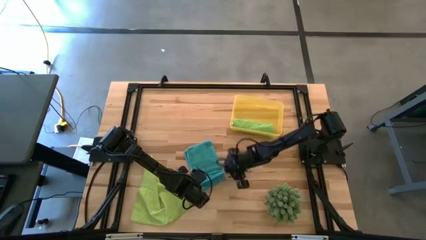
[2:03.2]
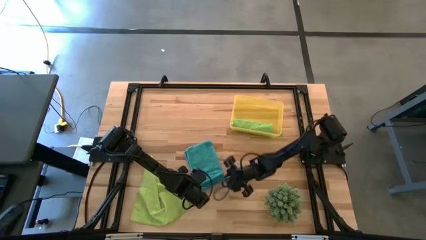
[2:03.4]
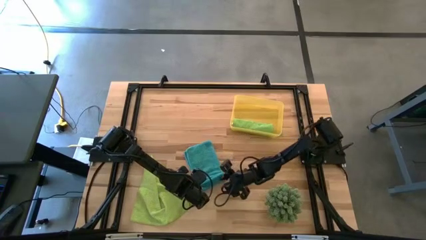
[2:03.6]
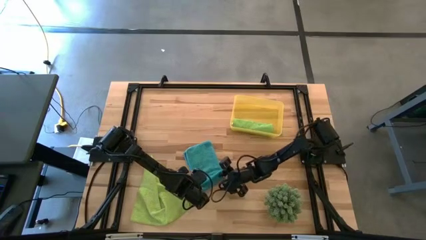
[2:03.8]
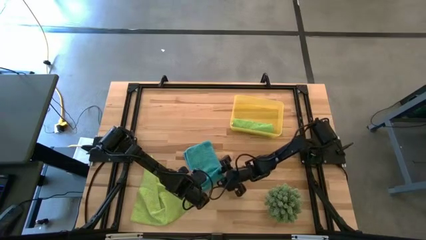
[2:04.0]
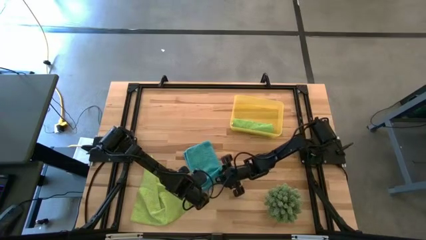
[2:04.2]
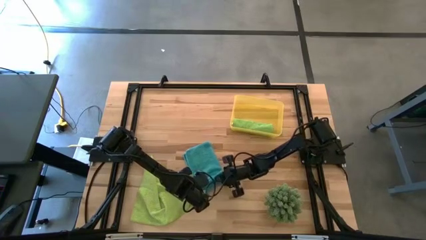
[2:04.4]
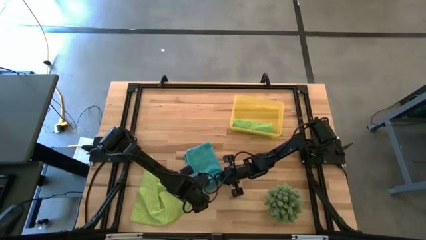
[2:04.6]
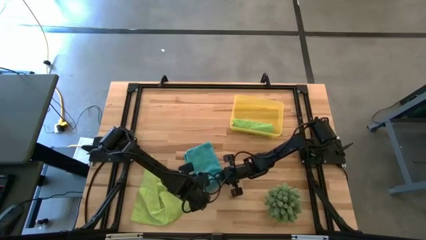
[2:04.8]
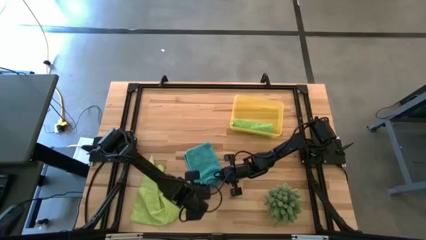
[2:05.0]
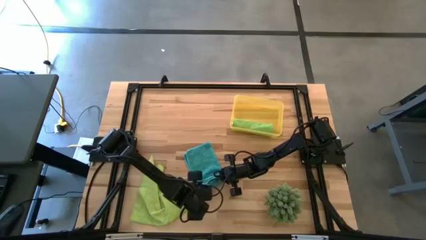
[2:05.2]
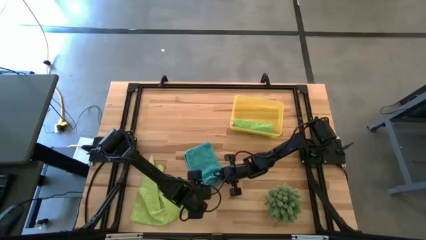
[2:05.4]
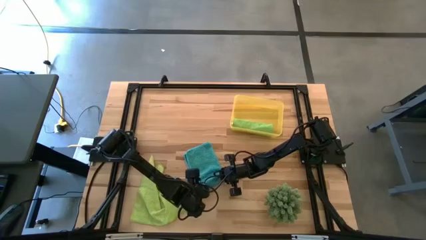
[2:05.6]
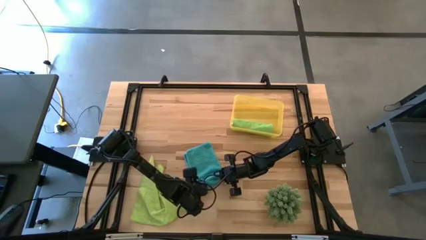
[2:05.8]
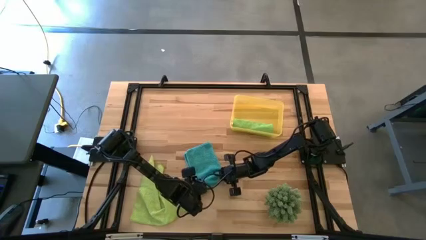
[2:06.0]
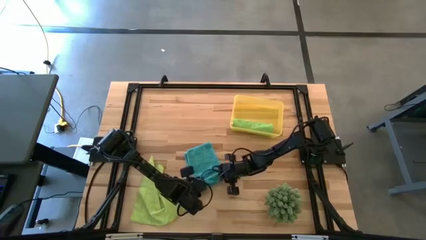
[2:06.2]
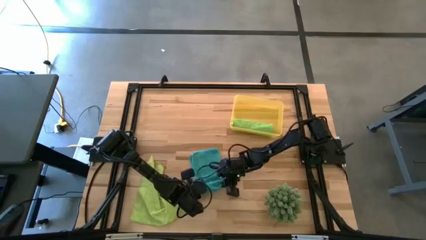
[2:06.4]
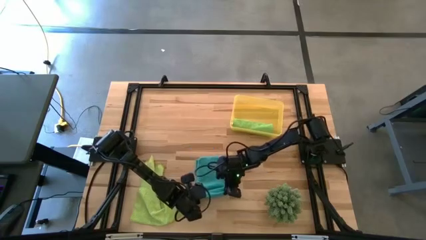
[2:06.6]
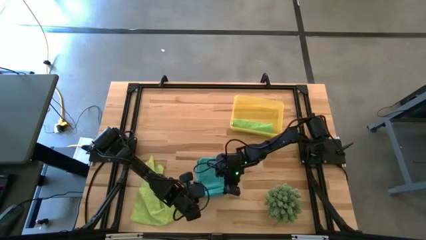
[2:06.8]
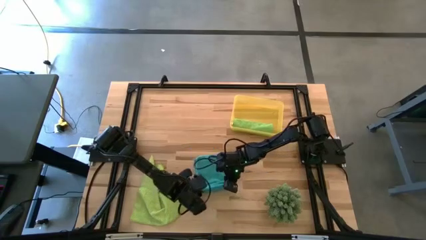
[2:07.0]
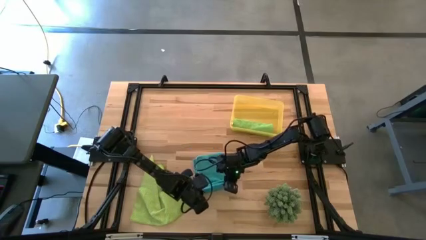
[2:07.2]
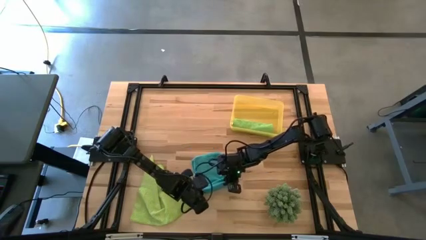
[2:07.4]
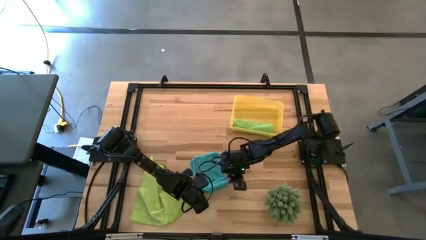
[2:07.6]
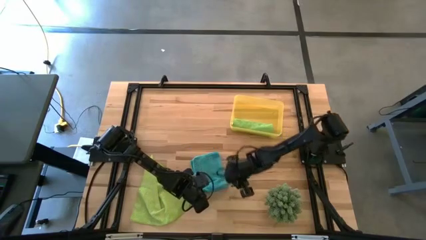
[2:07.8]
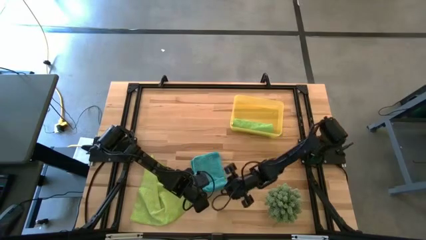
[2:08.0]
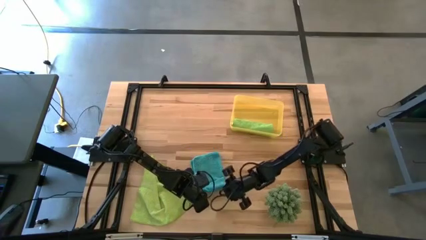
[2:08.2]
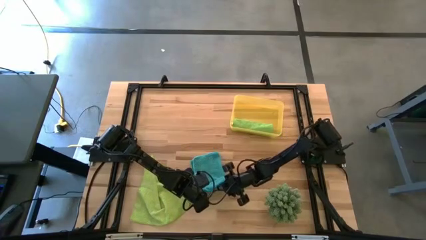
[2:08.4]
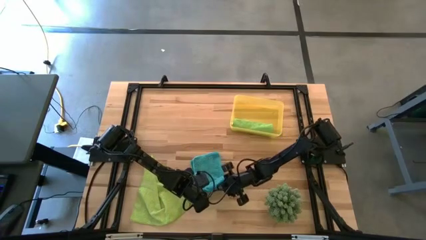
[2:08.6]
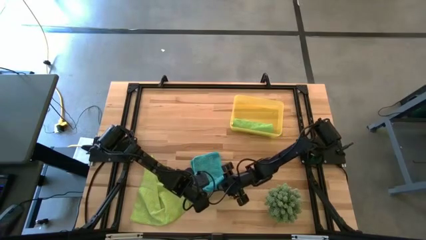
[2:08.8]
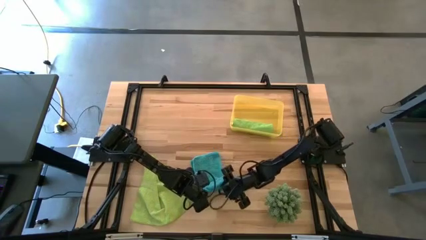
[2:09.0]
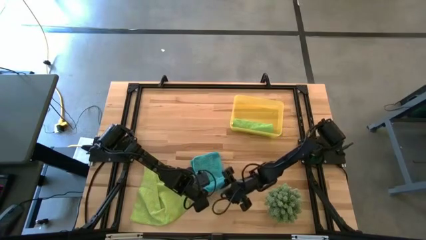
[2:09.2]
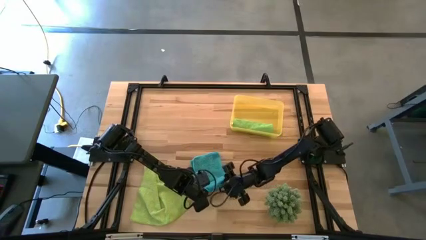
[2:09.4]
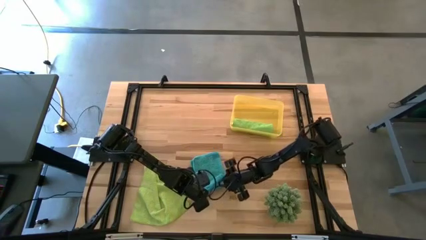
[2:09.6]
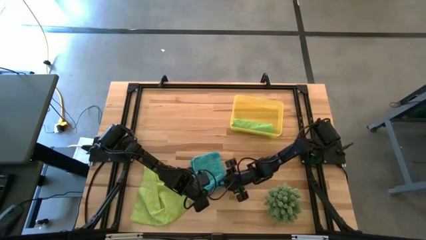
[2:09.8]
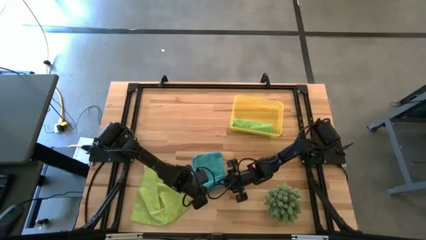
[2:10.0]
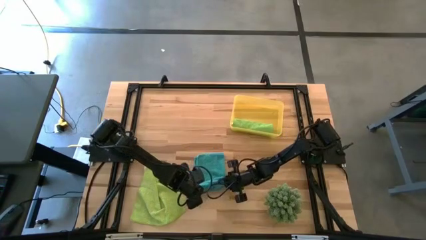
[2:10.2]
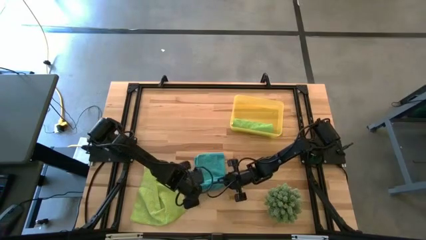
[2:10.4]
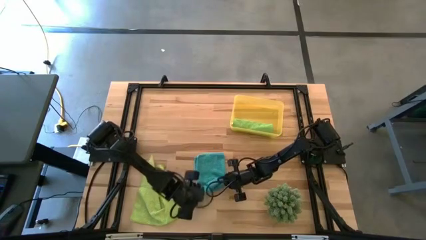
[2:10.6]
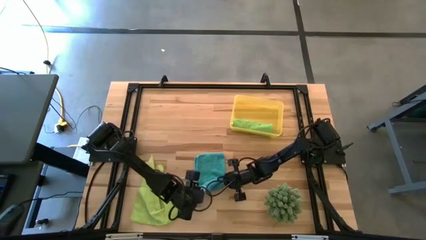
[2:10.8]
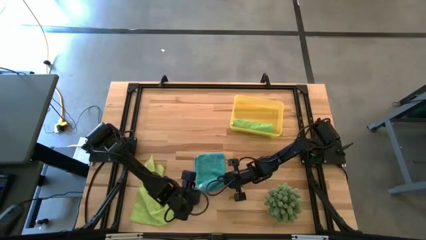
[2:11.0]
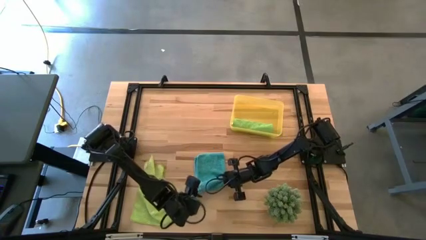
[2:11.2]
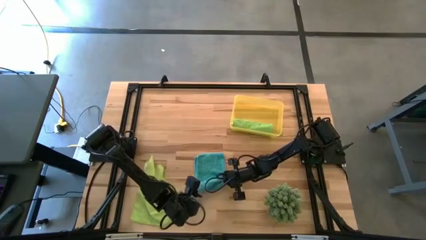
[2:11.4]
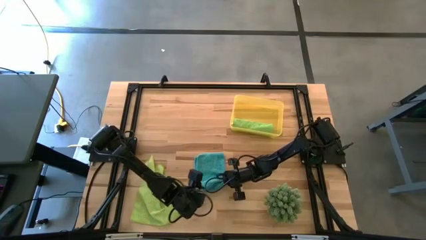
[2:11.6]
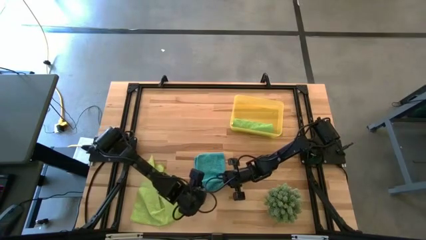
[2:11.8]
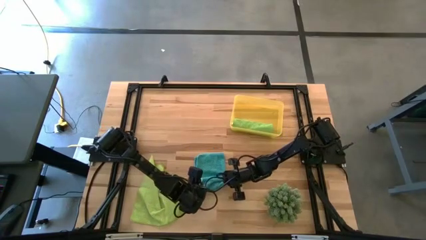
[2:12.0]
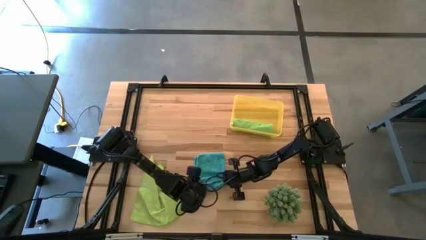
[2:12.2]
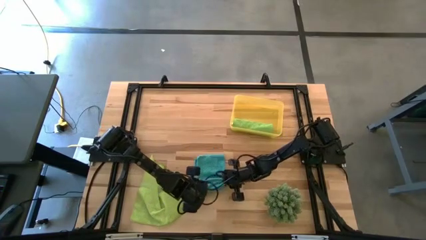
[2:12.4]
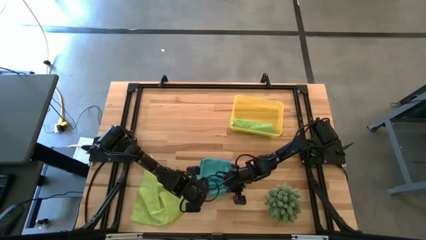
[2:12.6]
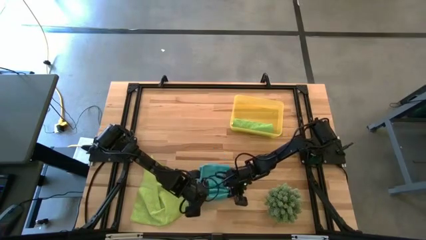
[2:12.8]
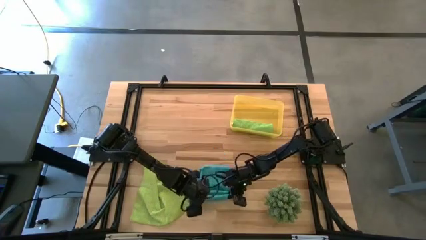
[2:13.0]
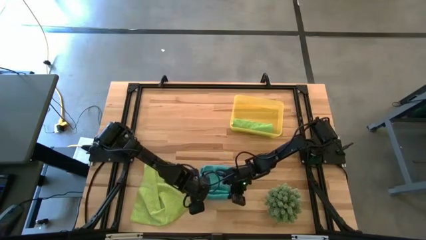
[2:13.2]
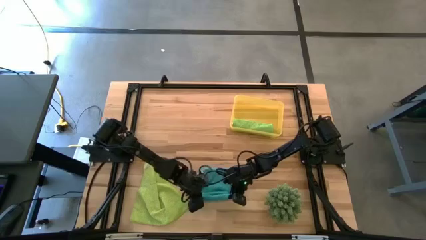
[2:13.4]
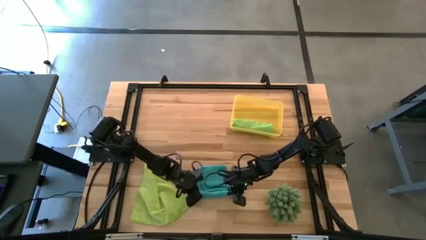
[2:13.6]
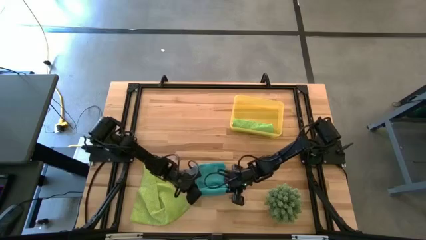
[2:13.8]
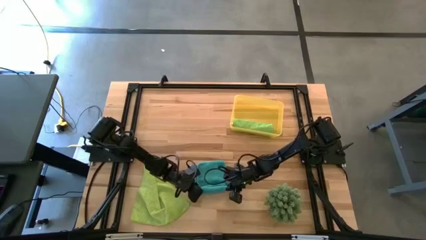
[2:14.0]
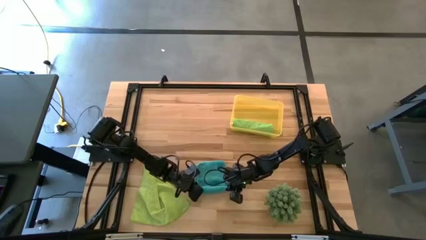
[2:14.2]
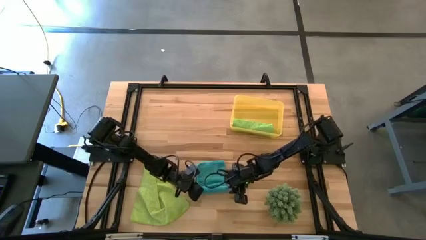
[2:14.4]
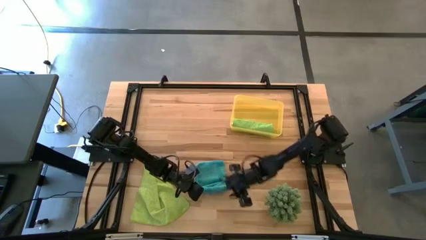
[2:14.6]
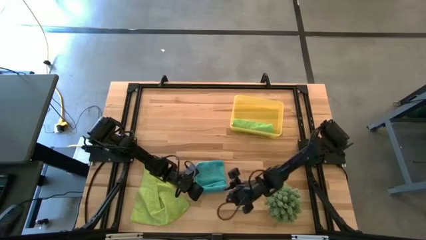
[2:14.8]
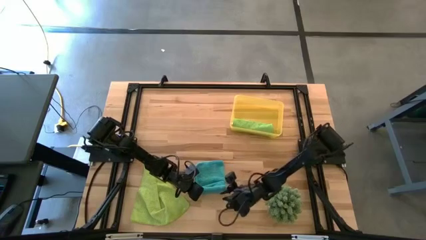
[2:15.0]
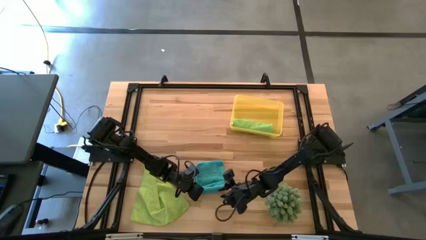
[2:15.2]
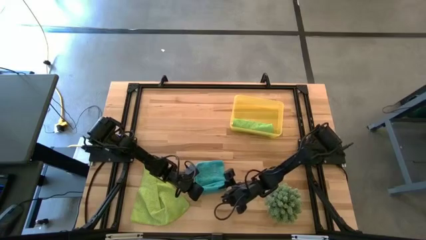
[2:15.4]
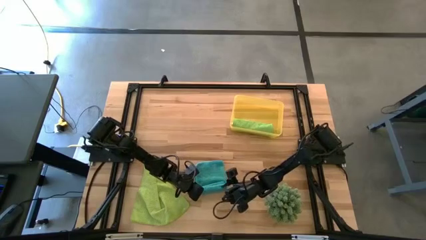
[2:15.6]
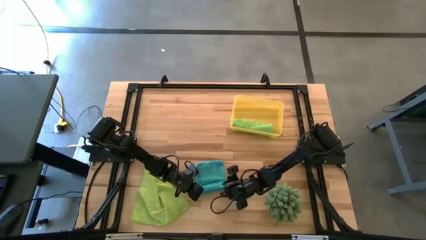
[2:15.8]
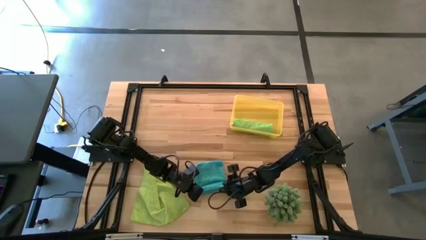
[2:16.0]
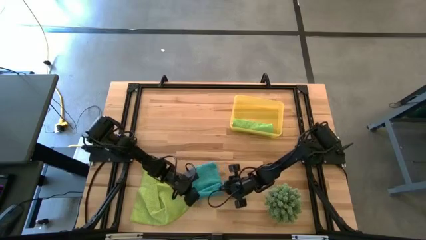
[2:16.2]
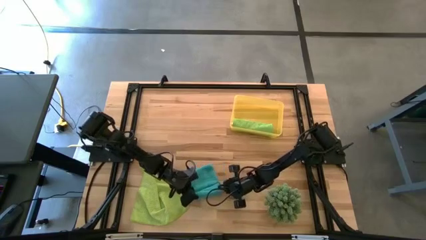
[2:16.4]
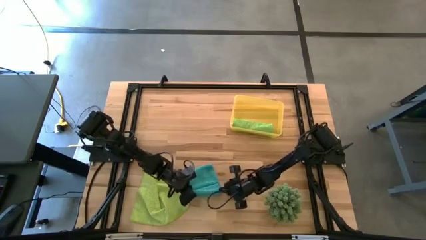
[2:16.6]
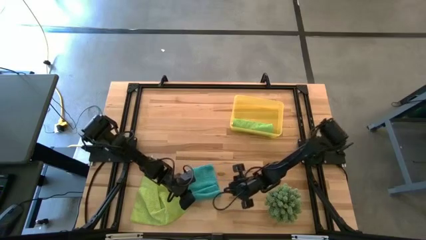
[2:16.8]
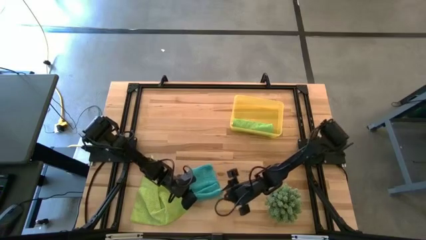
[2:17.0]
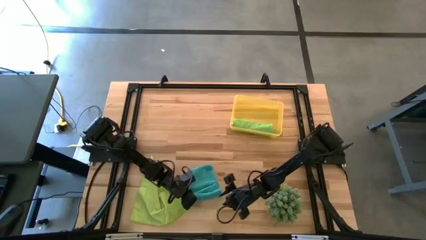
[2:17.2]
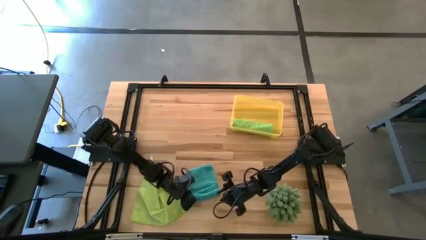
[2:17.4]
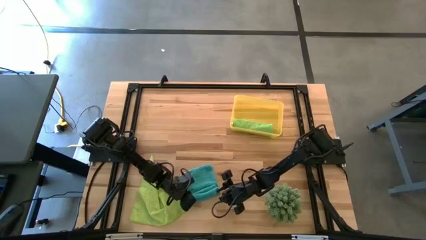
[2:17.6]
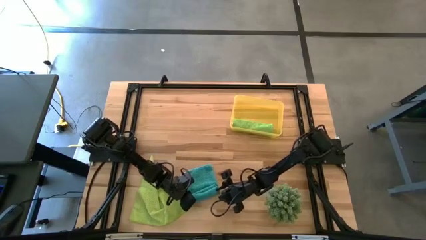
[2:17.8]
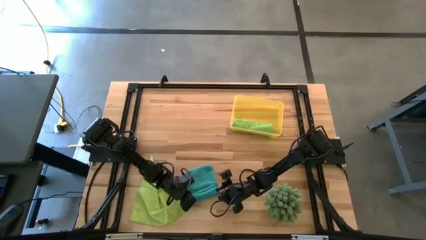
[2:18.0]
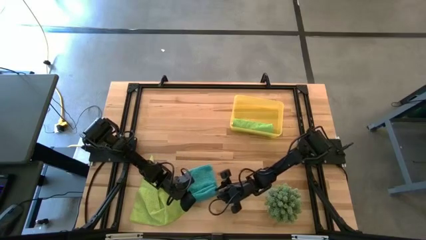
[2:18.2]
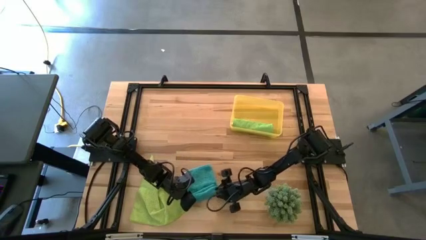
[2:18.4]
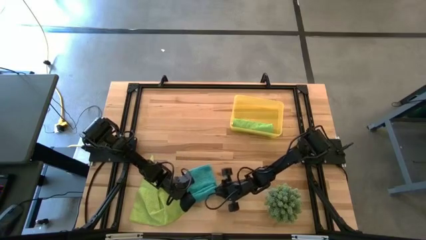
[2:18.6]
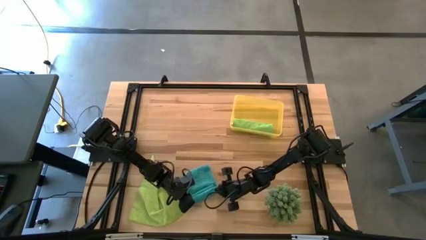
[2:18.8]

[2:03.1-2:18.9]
Task: Roll microfiber towels into tight, uniform cylinder then place into a basket
Roll the blue microfiber towel

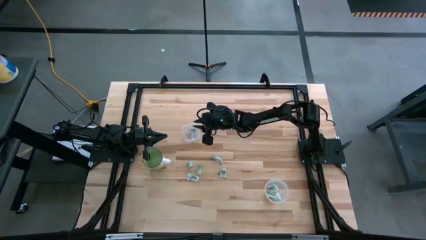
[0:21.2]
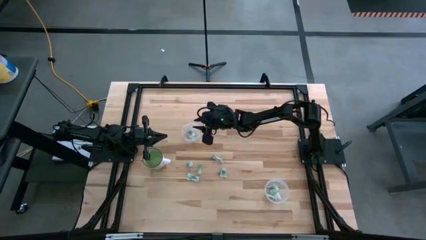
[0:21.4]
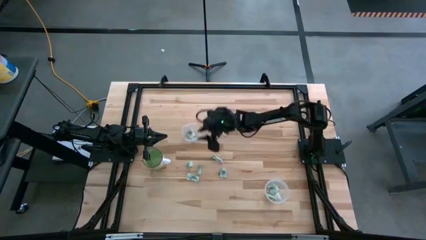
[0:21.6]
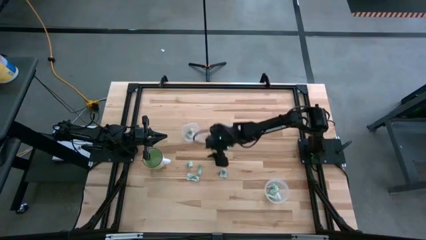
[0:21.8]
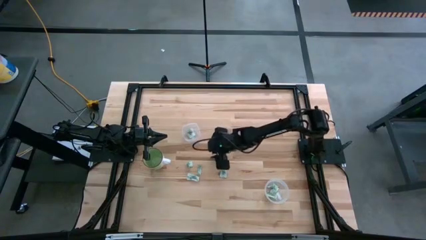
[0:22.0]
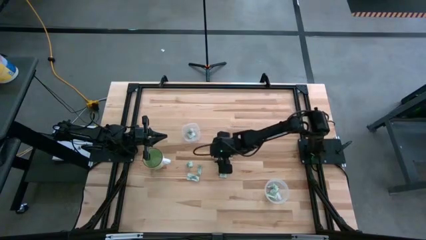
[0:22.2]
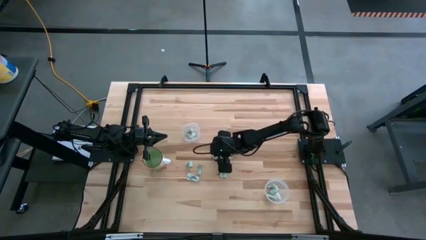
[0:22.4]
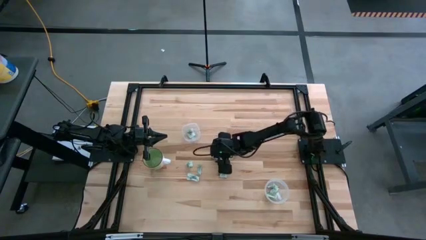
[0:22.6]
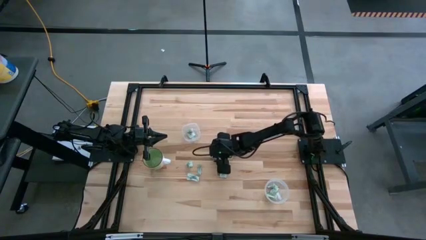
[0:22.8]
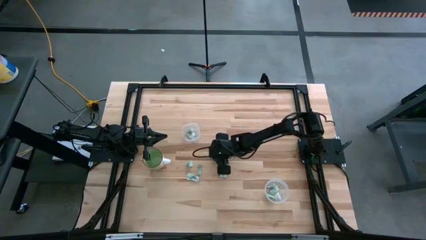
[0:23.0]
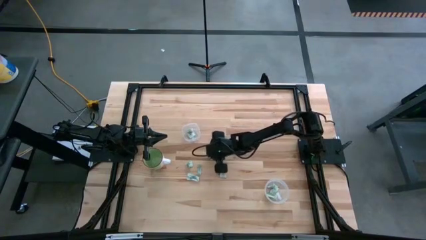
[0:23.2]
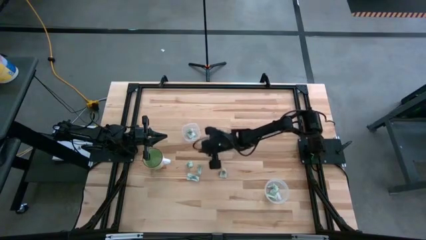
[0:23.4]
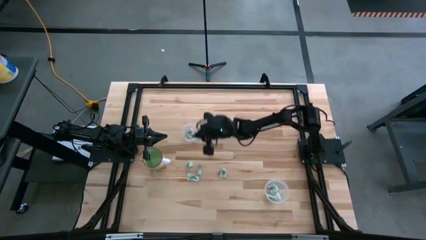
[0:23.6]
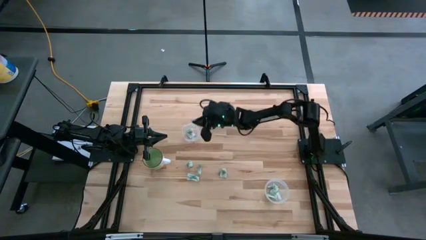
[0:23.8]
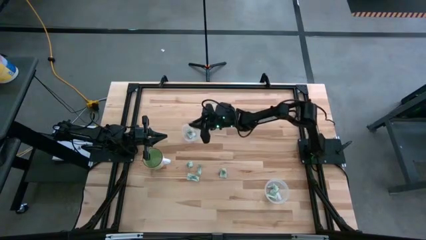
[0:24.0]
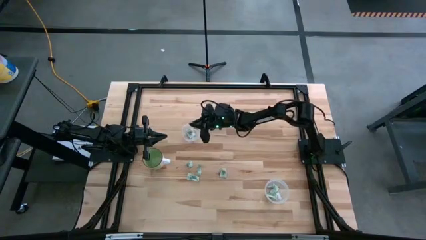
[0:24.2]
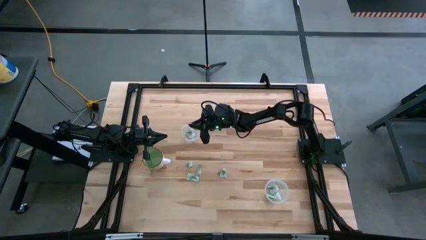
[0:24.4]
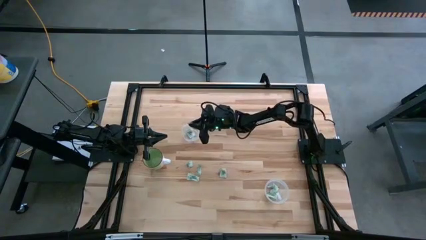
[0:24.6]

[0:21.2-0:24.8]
Task: Pick and place items into bin
Put the green stevia packet into the top transparent bin
